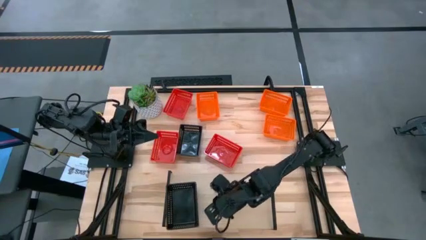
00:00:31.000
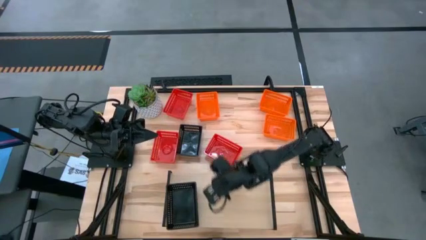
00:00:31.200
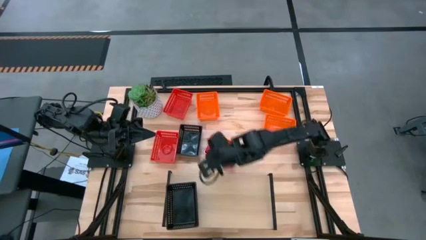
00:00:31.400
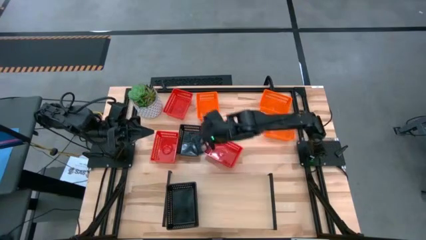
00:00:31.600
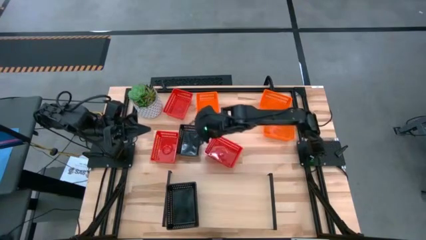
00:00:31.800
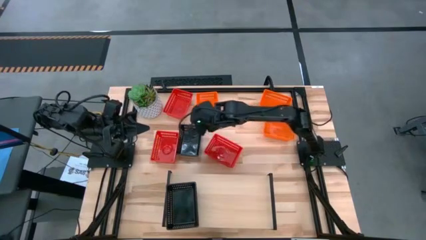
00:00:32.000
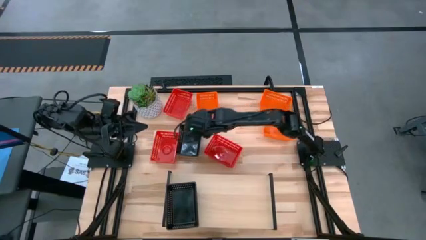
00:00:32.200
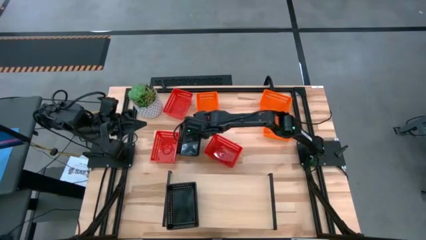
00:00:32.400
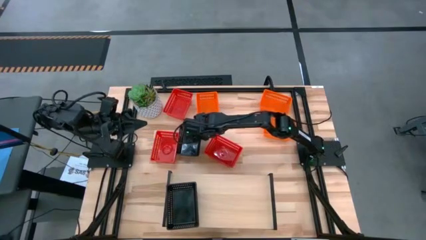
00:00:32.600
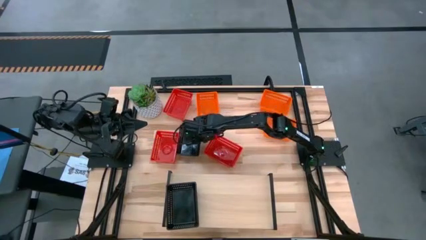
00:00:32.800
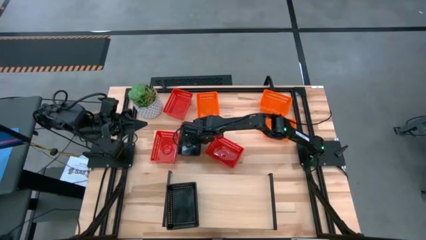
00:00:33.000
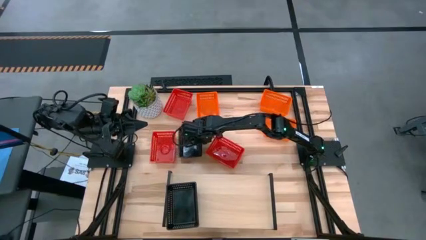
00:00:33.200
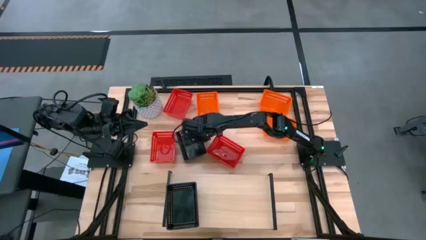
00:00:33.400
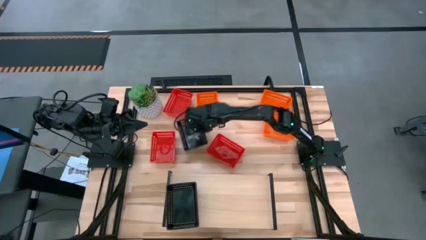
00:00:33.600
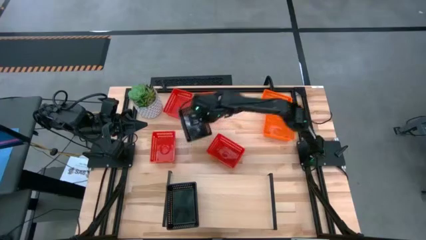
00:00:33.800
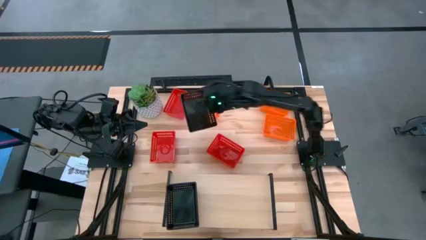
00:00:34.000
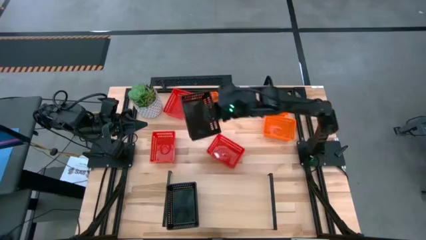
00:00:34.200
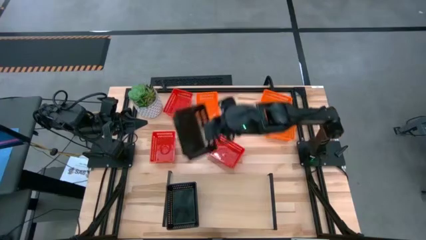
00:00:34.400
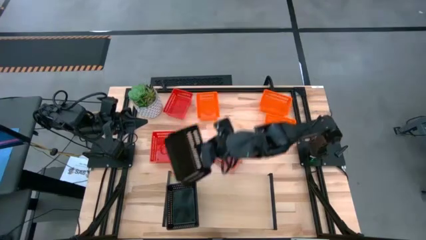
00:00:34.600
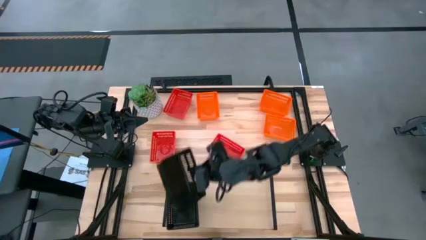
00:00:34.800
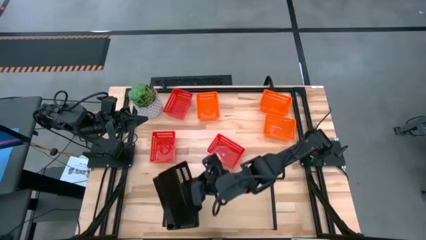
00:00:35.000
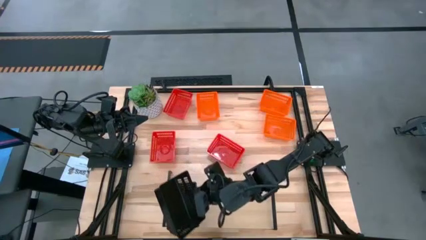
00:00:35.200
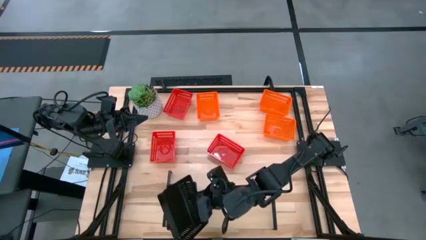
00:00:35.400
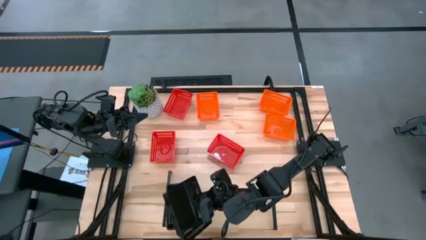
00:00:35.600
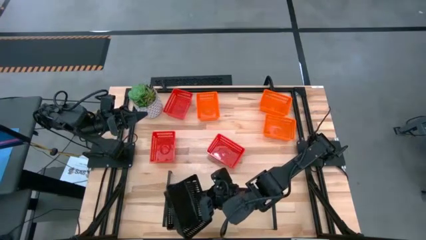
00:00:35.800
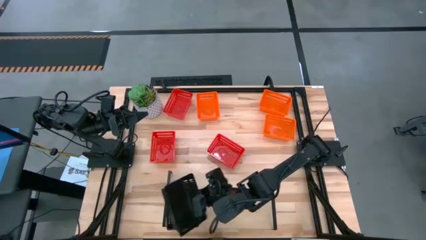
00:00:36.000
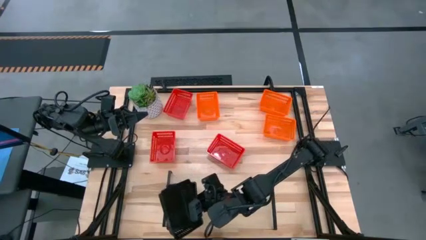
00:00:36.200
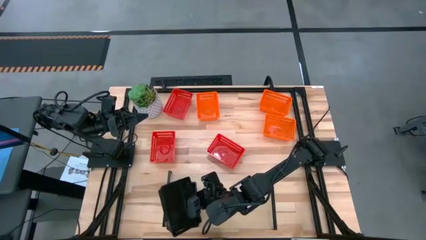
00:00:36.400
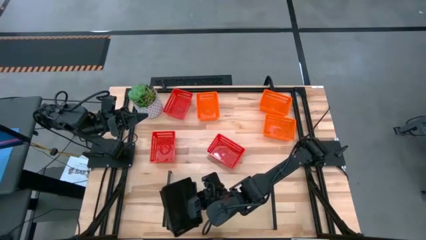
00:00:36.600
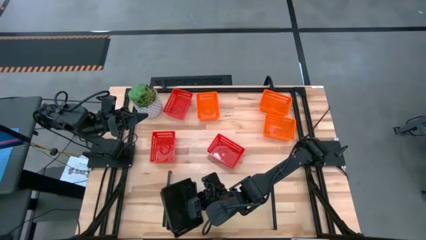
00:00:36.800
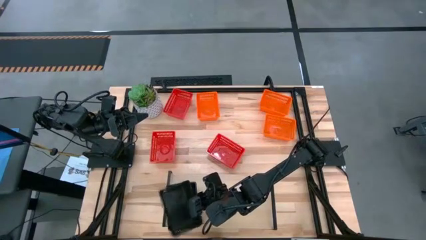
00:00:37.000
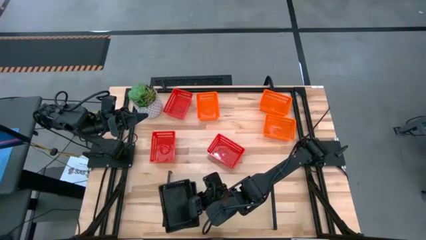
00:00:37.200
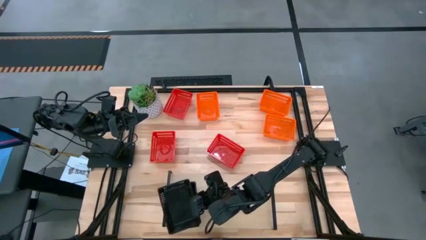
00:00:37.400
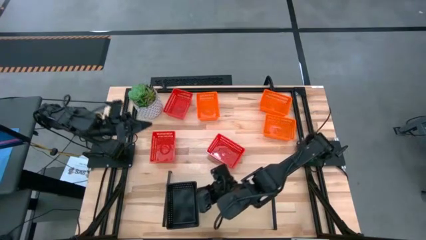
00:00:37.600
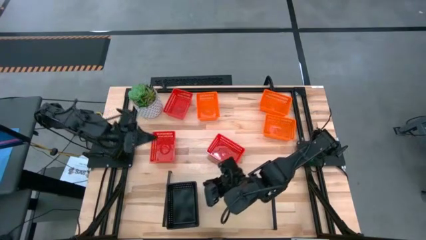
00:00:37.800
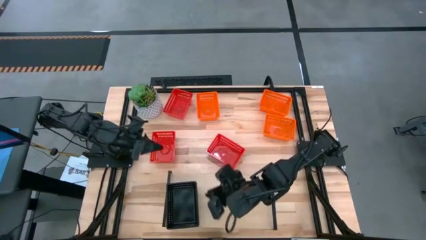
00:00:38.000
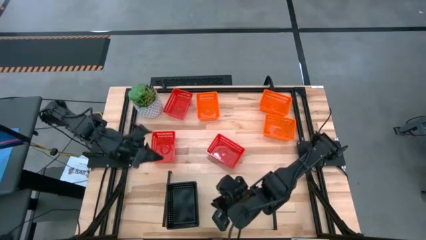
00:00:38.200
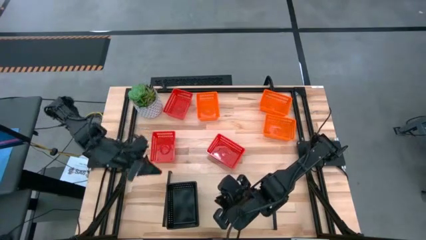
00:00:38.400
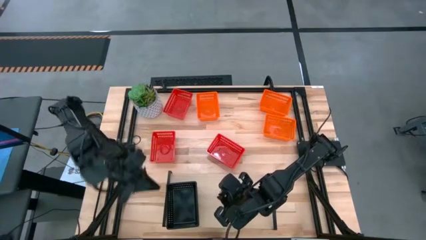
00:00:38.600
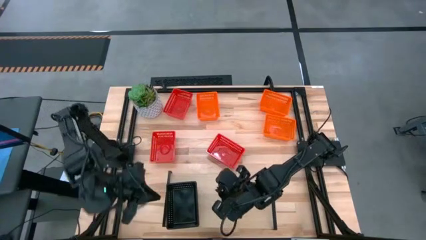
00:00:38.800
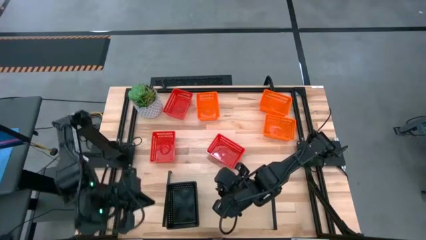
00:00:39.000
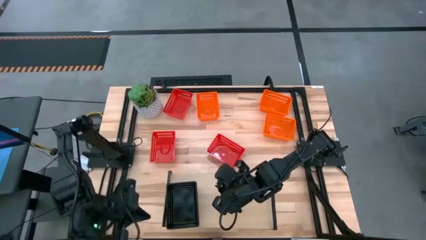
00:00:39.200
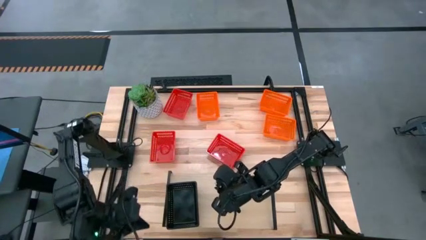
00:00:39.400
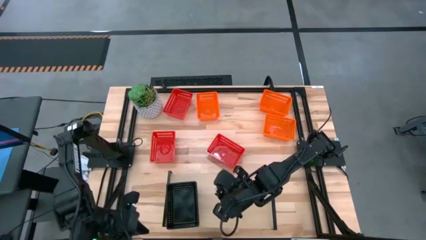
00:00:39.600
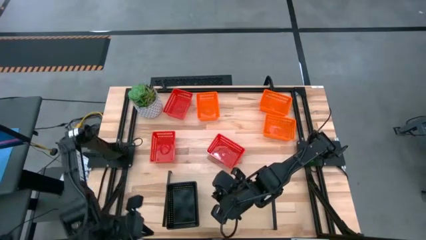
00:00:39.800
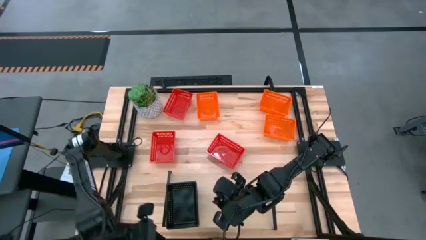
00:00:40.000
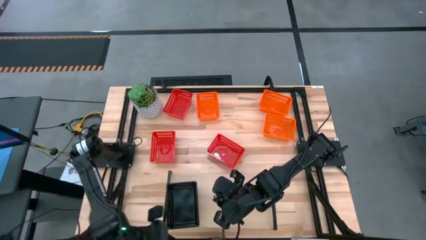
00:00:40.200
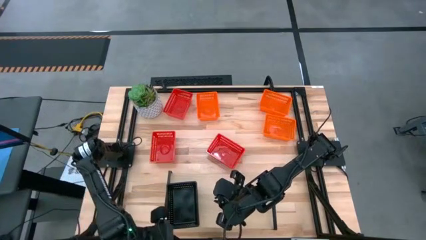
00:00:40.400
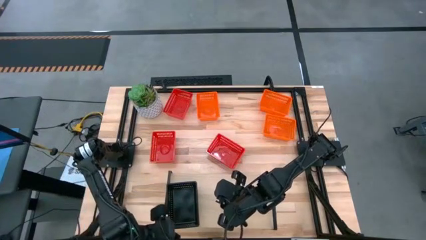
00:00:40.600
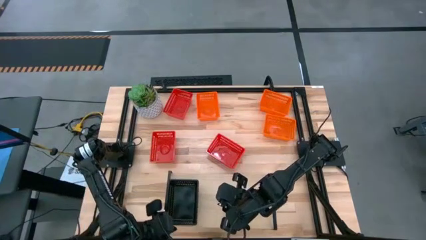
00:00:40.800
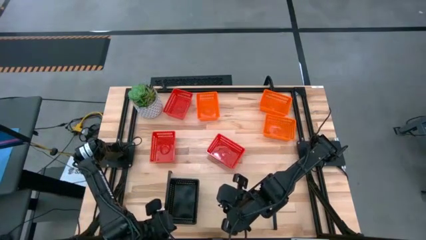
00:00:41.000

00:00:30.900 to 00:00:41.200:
Task: Stack baskets on shelf by color
Stack the black bin on the top of the black bins on the shelf

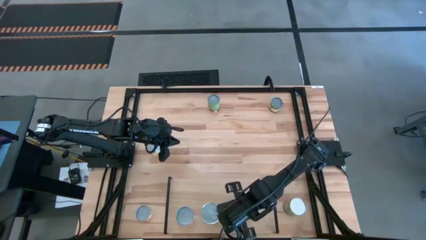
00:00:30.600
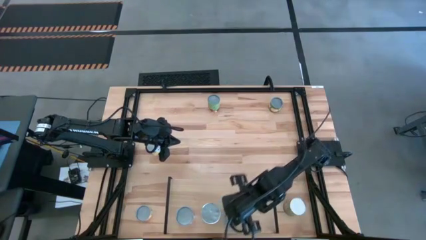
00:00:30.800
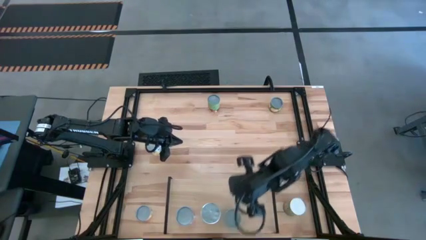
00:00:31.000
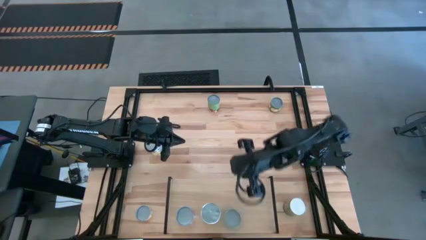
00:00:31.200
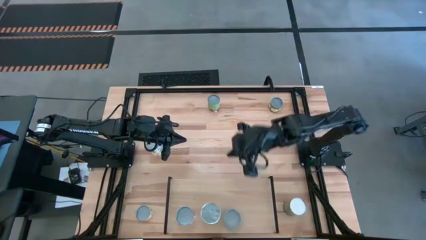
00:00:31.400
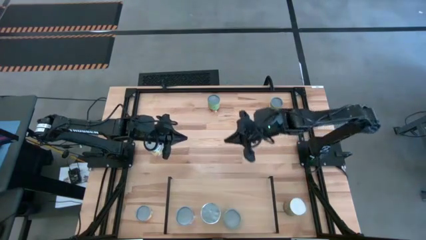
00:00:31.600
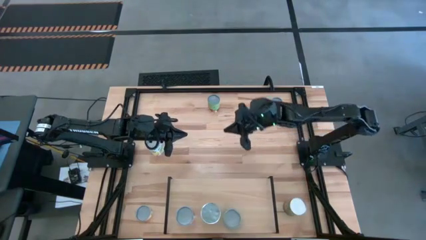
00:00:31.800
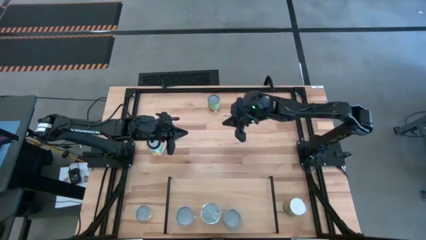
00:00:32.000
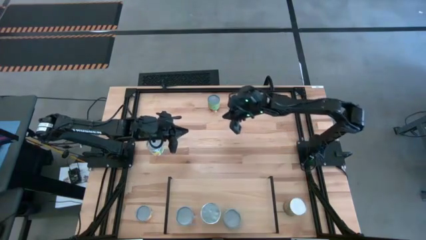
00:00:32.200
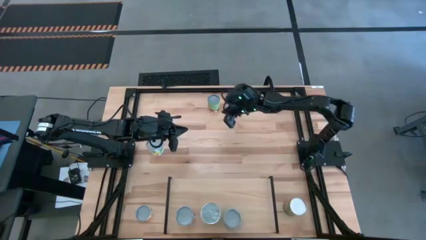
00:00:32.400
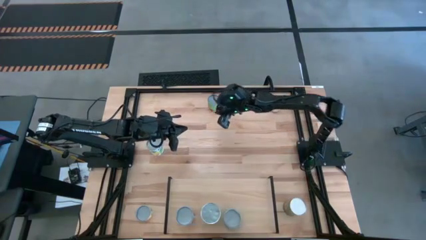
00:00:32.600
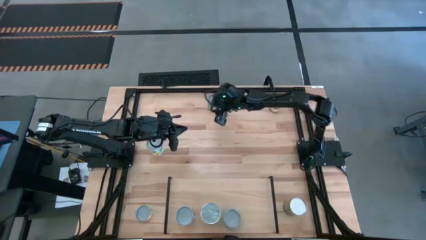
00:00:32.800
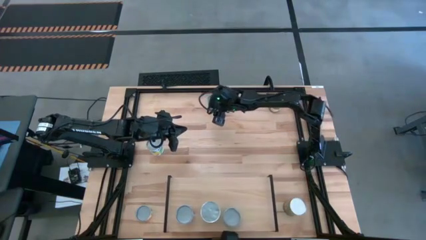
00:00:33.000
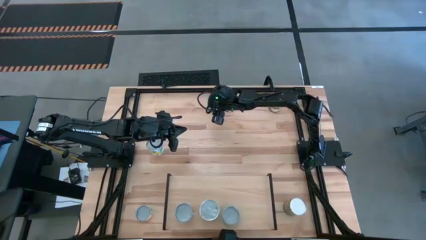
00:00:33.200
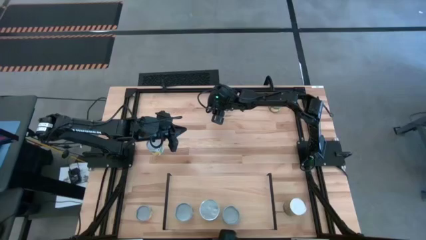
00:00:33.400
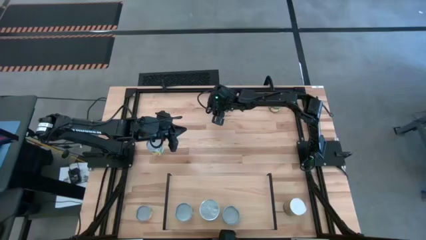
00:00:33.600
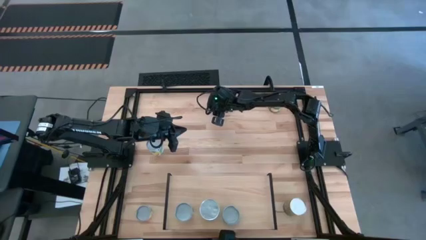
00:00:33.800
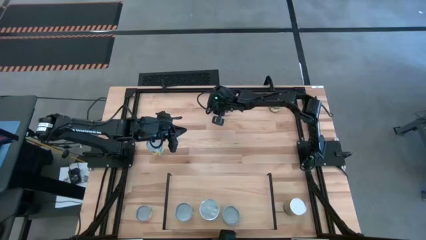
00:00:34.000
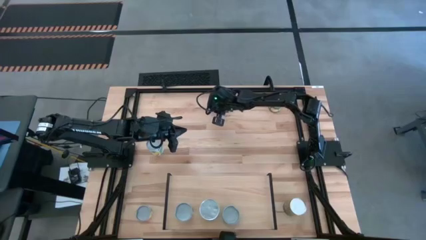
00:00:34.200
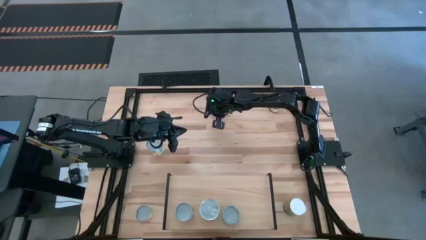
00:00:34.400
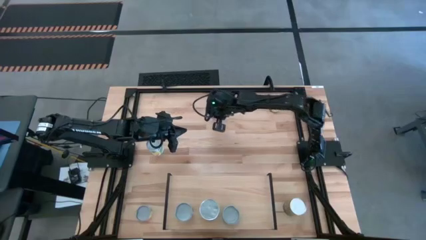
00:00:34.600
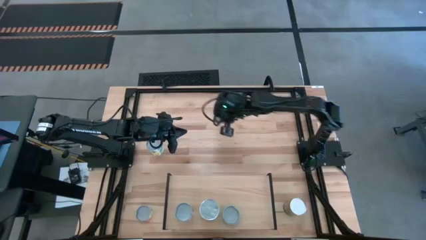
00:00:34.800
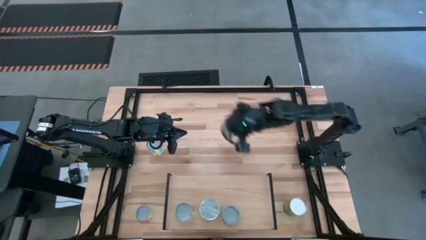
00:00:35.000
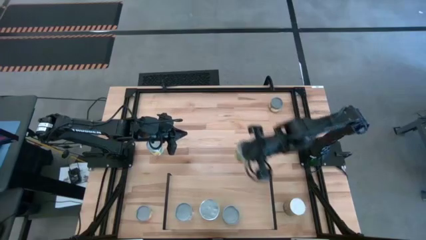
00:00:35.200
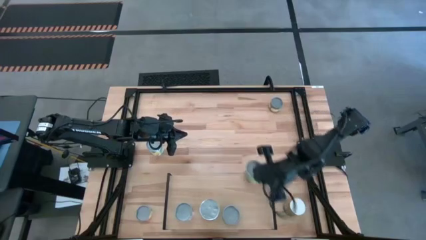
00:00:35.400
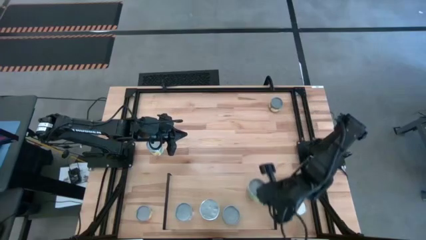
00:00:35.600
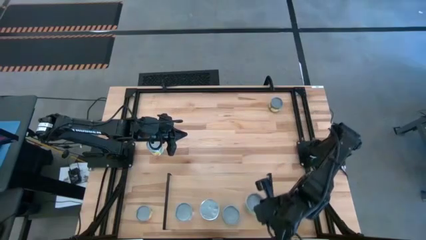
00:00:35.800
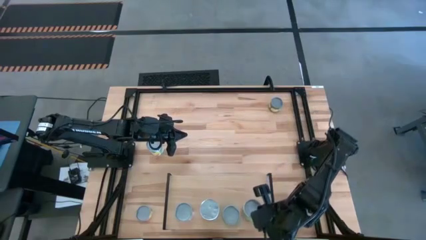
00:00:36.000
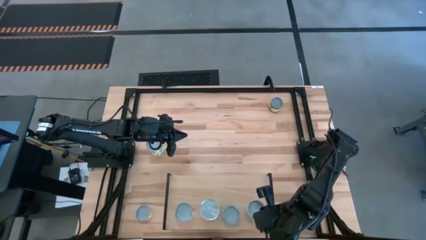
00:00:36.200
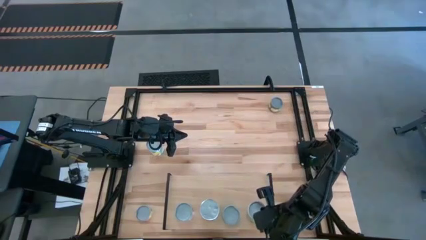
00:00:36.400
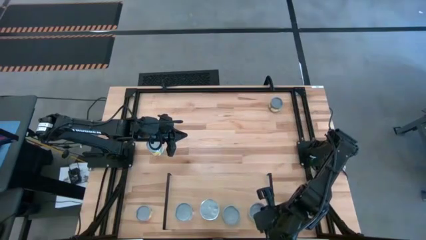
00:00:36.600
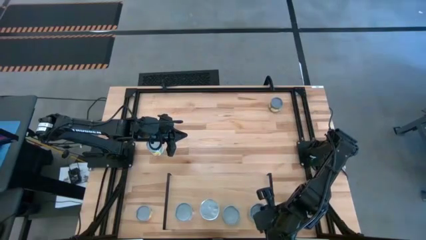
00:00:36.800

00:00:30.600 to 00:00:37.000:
Task: Pick and place cans onto a shelf
Put the canned spaghetti on the shelf
